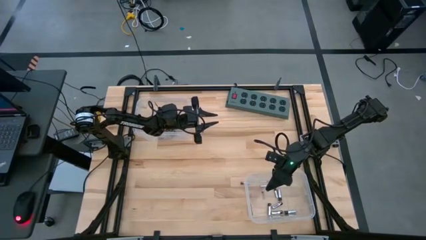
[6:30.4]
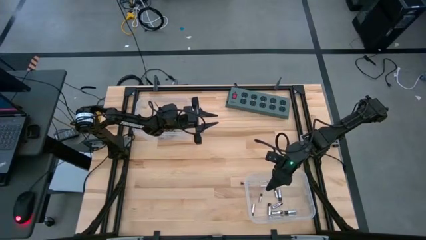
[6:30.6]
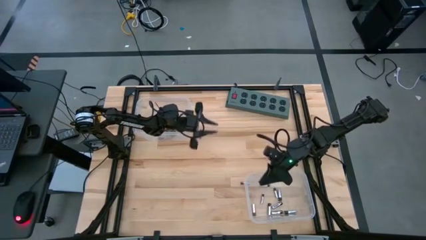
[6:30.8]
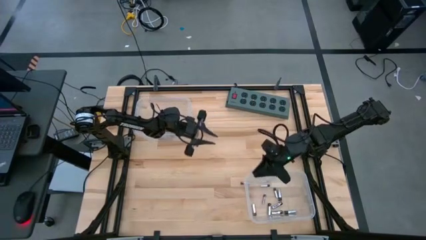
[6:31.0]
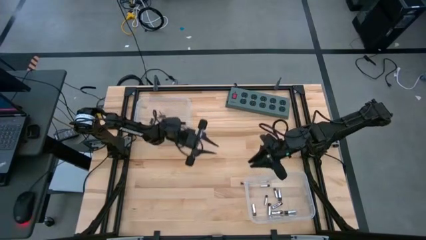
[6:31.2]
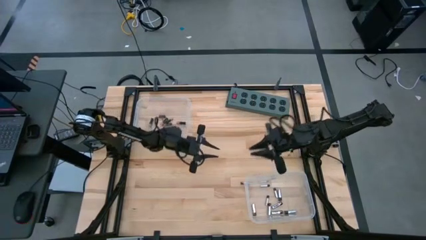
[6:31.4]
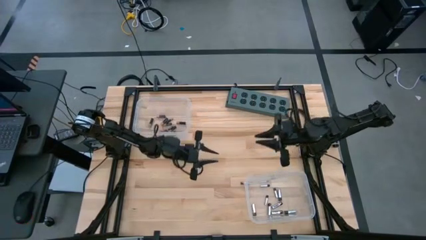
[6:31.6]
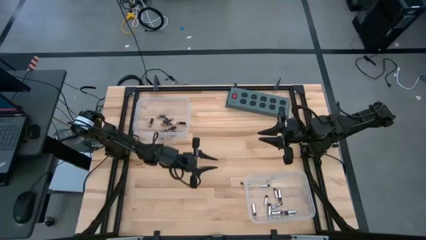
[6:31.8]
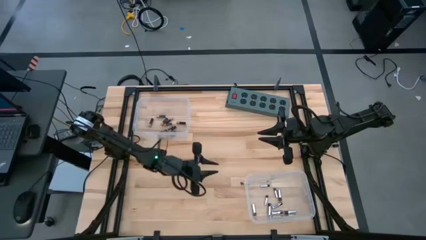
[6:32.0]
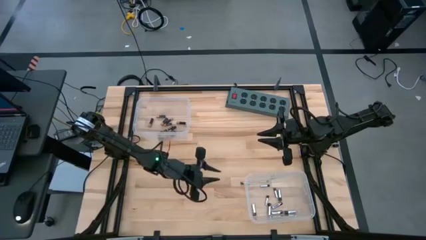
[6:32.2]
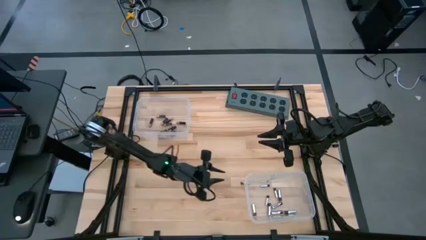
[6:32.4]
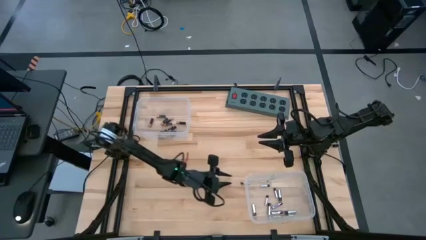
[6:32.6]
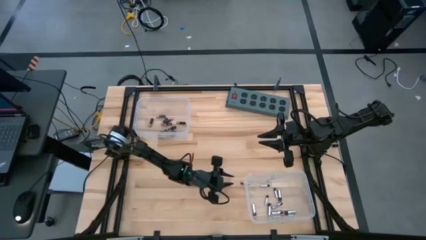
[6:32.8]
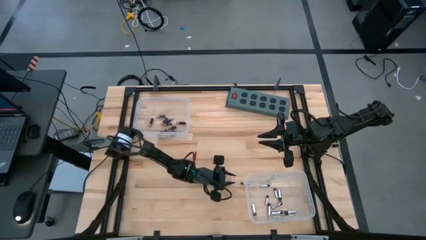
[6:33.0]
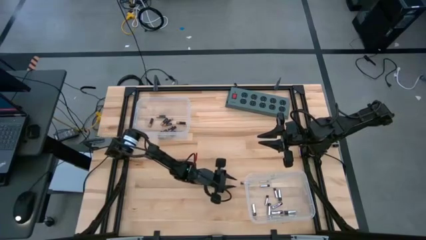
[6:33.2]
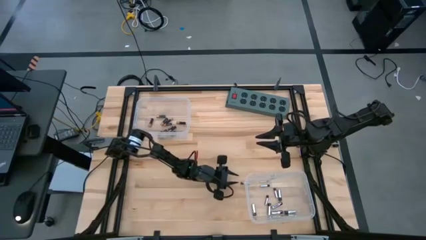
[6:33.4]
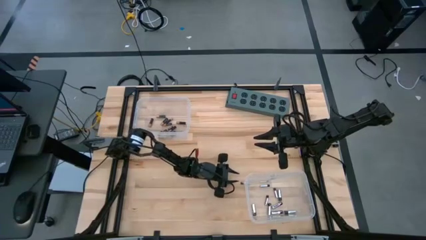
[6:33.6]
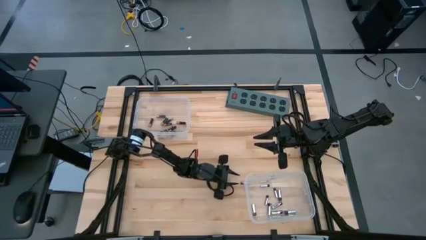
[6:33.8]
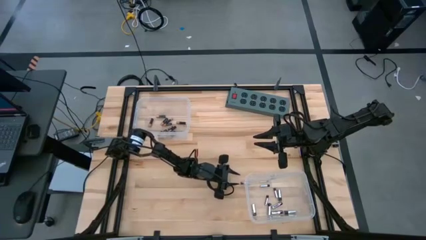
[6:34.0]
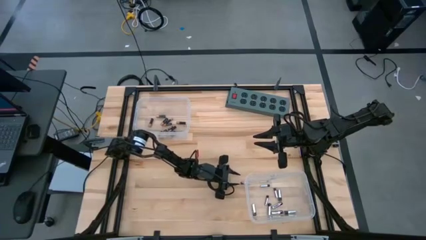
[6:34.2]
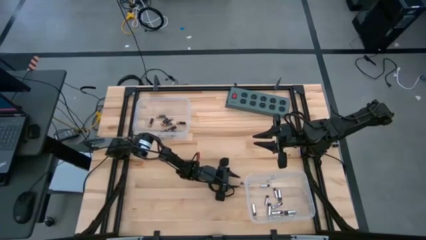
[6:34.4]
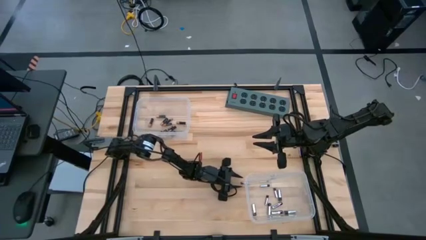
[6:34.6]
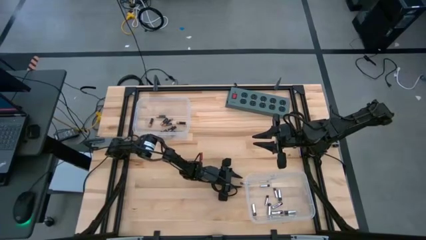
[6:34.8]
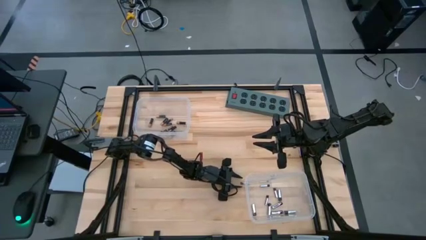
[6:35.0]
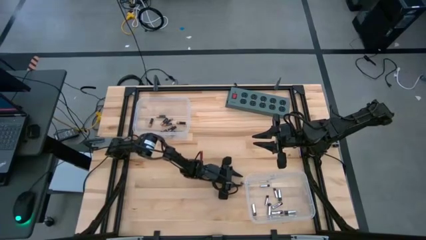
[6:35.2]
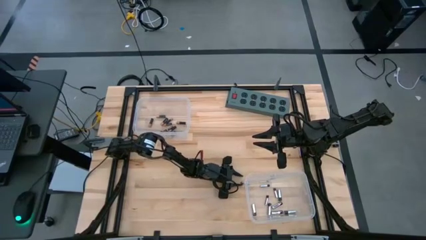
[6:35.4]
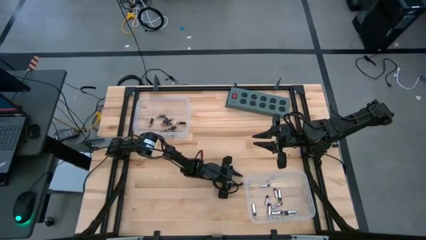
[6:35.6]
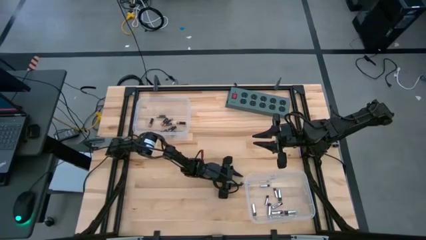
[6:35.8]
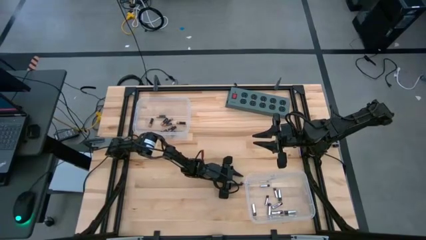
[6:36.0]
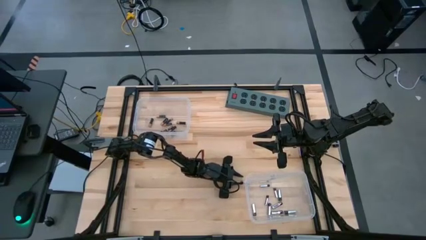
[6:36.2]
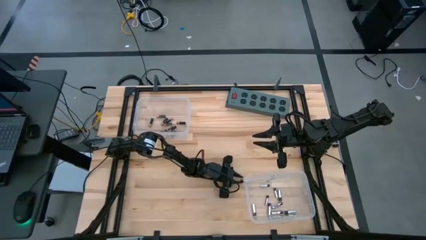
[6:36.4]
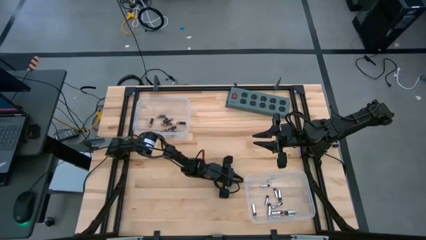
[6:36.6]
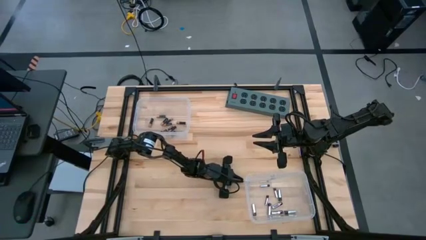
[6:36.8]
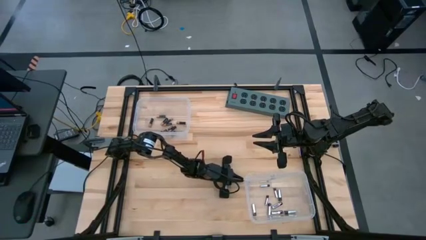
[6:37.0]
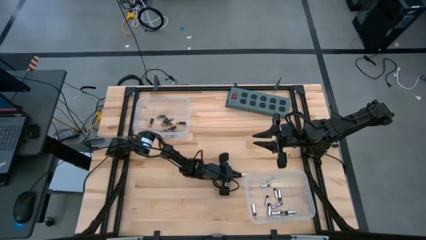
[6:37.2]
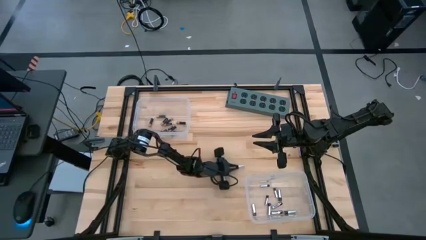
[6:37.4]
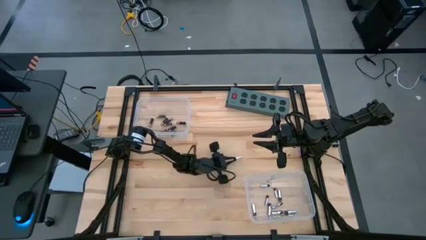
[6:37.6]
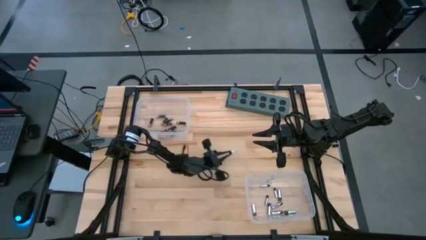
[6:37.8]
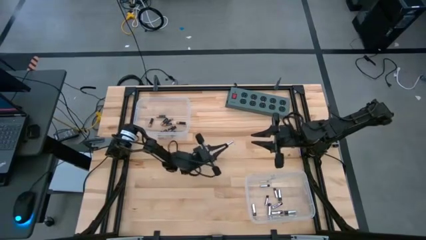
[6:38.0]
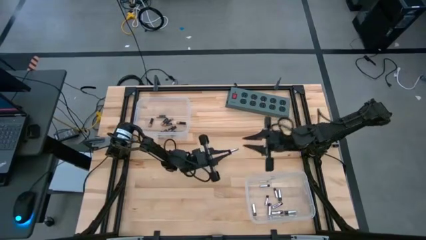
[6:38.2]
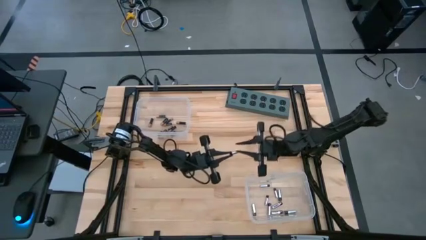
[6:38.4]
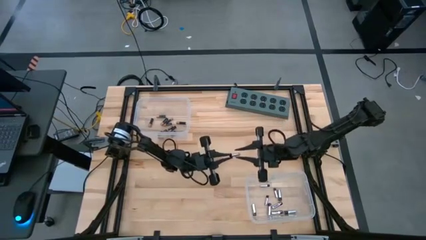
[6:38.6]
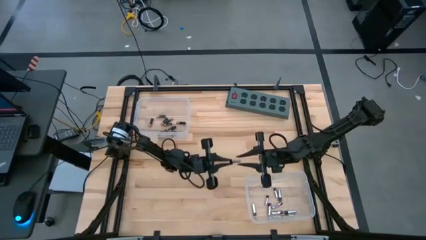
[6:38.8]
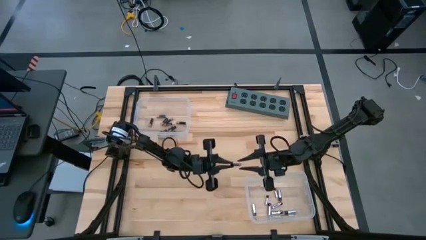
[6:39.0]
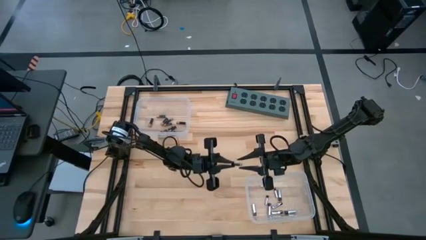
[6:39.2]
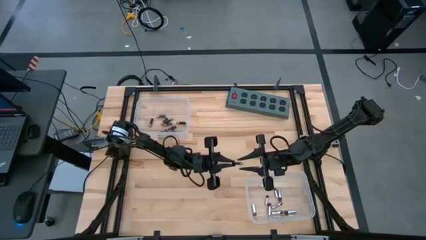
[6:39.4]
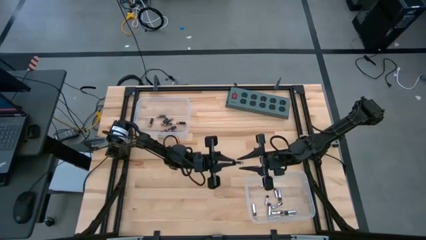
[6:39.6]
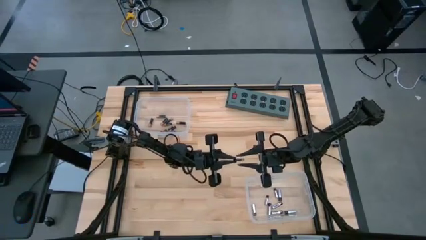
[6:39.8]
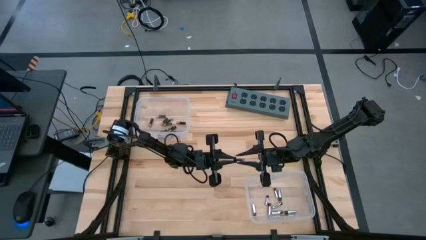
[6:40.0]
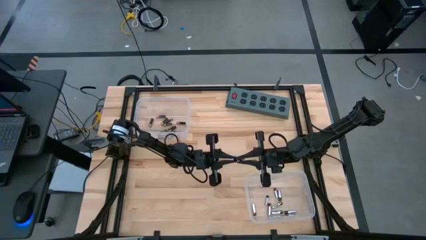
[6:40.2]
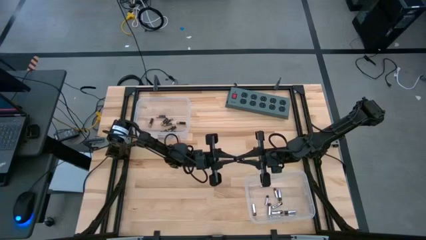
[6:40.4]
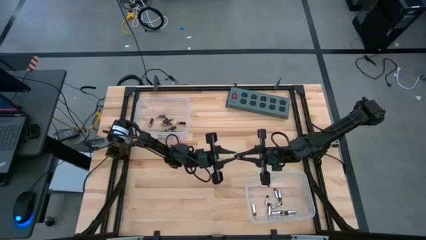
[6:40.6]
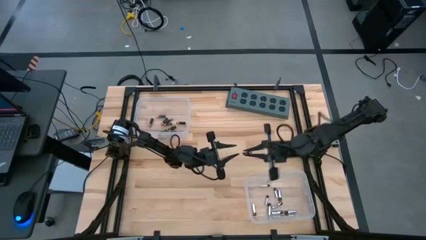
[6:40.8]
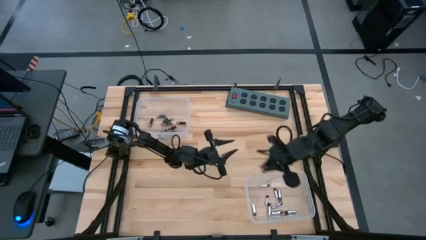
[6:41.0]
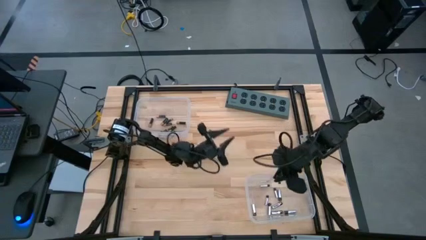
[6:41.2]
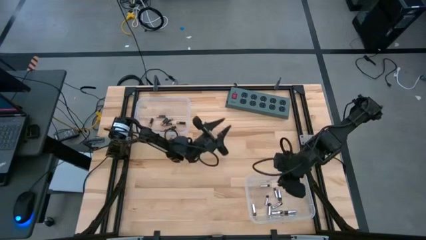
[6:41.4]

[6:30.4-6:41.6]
Task: Sort batteries
Put the silver battery into the bottom transparent bin

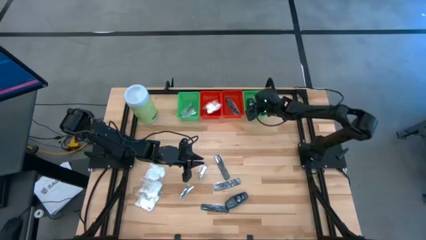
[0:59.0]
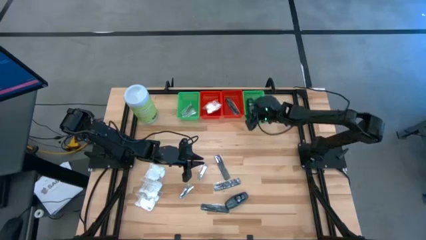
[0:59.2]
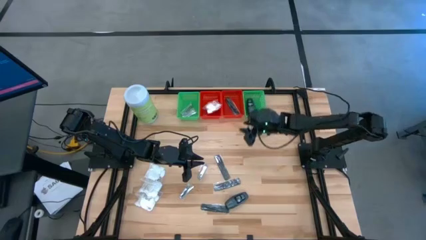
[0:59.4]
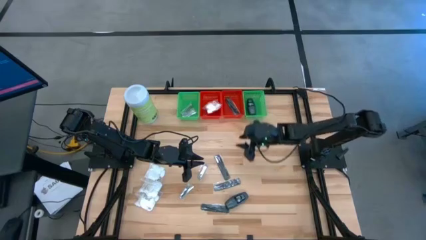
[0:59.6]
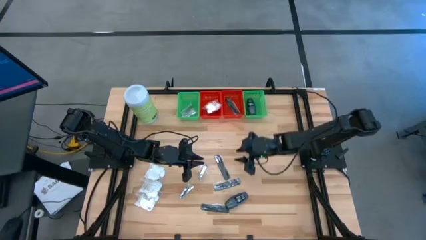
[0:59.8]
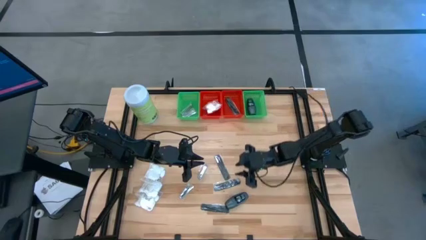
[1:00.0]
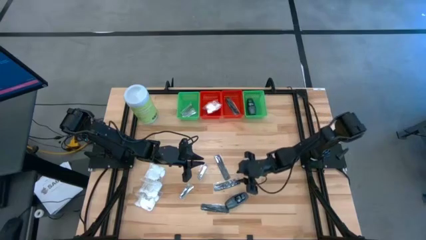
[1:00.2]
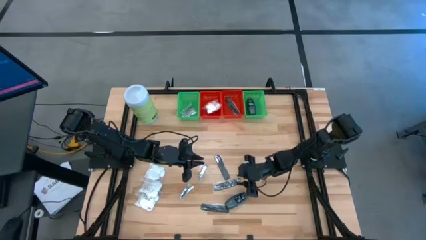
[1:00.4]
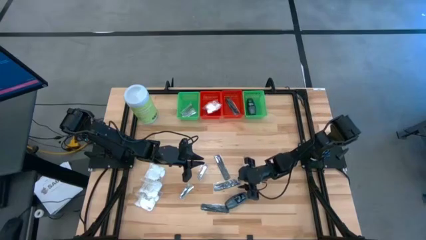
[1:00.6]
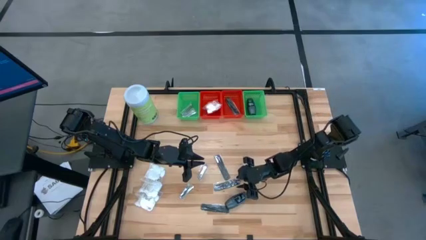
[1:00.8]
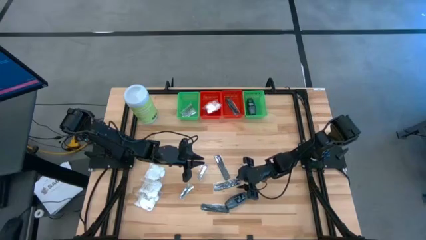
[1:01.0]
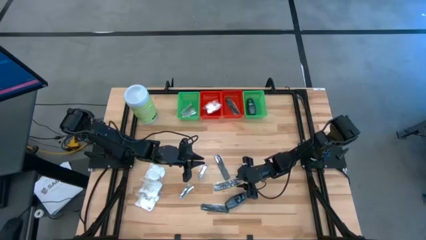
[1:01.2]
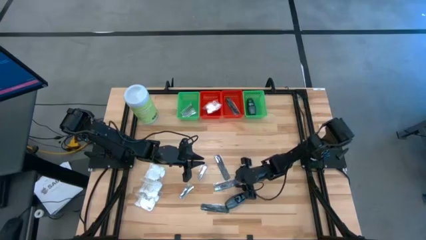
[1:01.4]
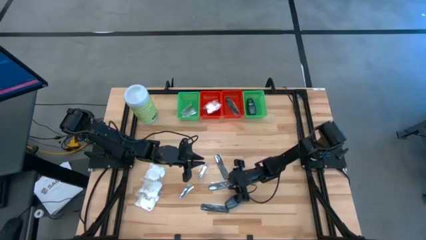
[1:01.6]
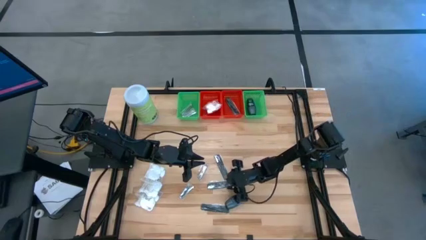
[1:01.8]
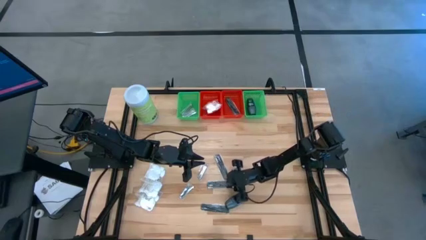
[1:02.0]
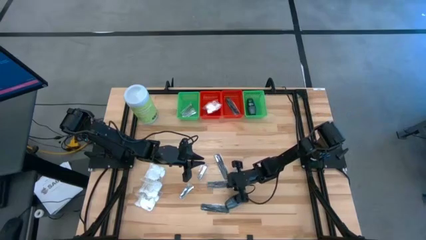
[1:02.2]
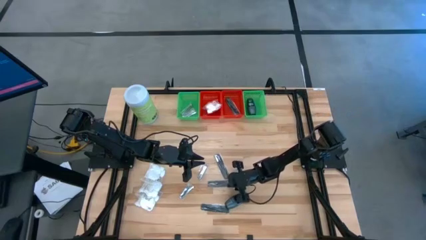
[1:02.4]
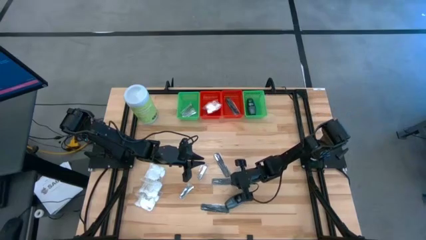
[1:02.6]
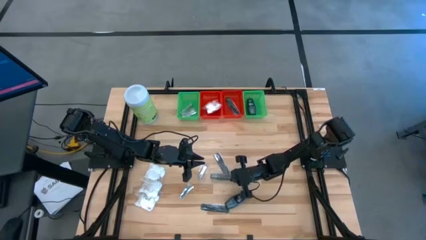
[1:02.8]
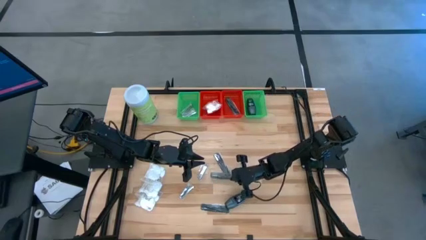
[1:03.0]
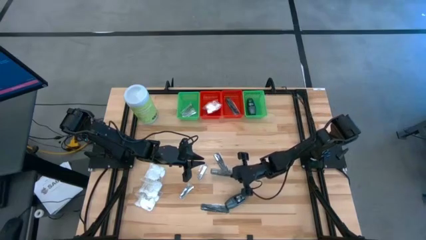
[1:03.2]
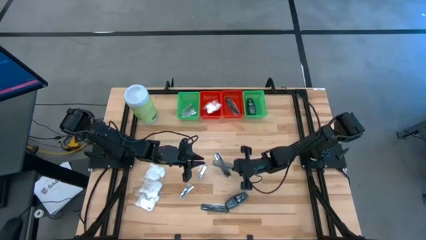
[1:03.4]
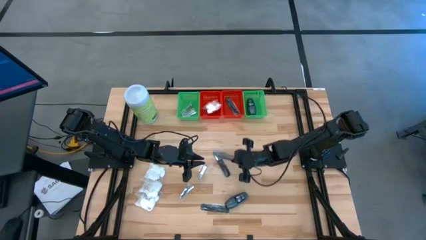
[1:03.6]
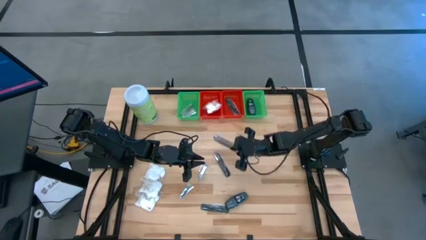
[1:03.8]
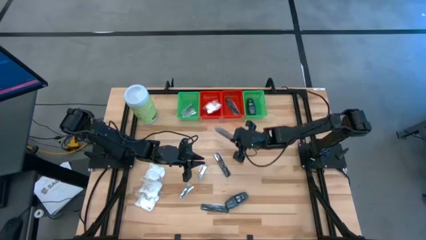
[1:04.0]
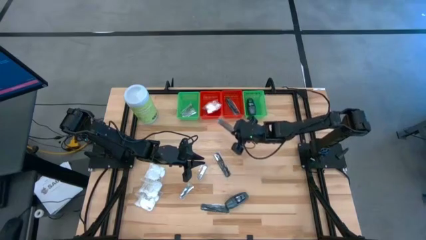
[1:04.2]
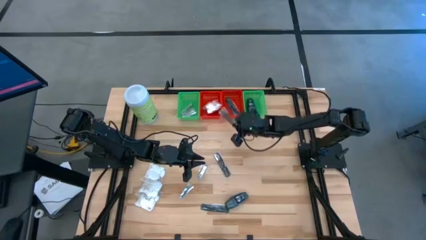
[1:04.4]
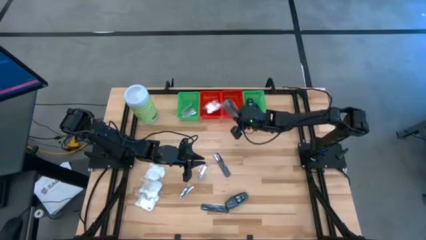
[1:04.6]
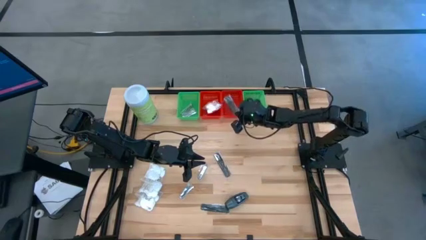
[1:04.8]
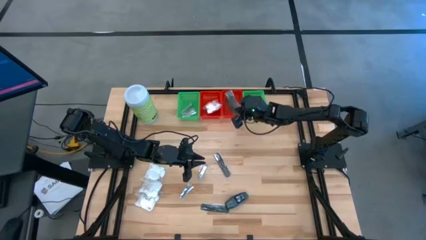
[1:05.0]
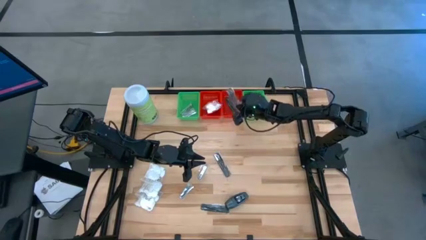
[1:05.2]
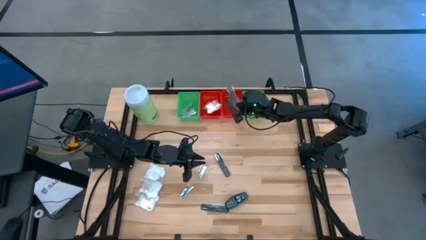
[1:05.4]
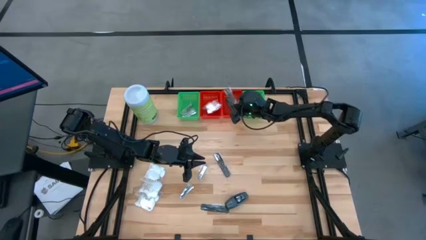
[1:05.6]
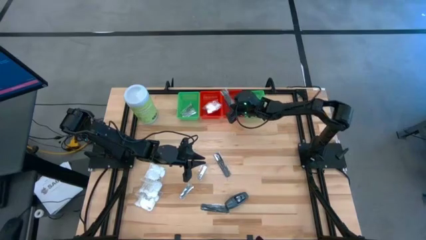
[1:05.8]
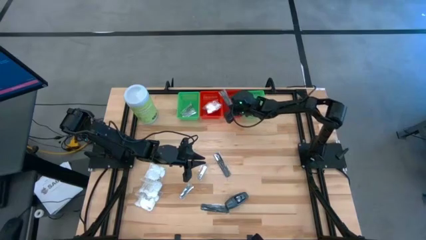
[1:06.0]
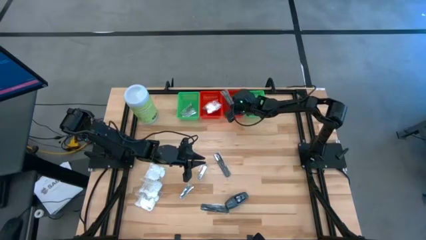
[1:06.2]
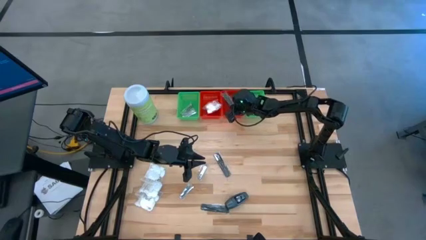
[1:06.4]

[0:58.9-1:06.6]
Task: Pick & Place Travel size toiletries
Put the black comb into the right red bin
